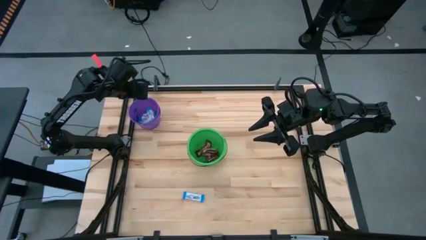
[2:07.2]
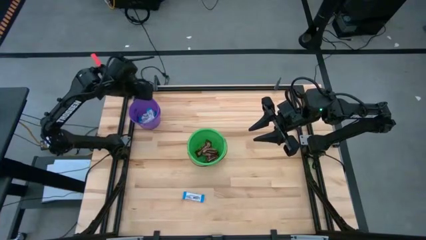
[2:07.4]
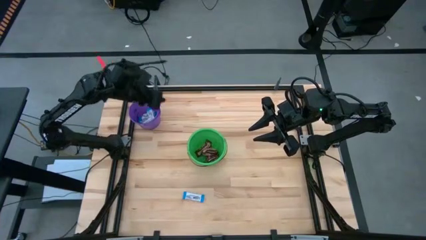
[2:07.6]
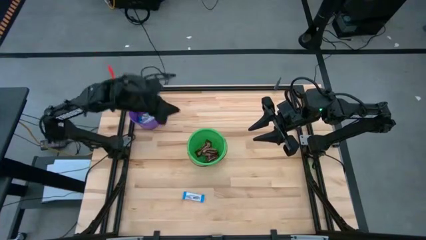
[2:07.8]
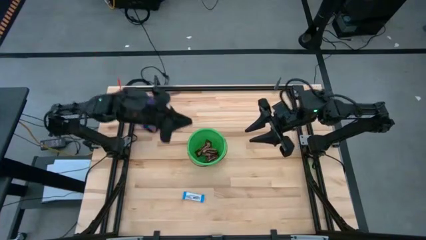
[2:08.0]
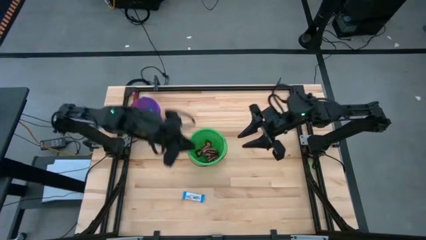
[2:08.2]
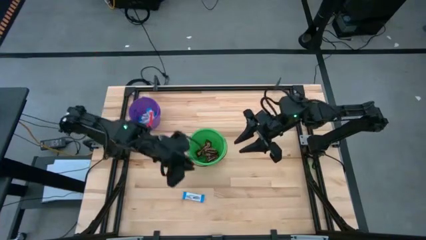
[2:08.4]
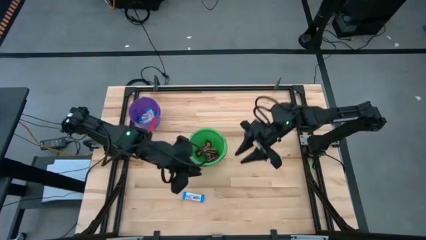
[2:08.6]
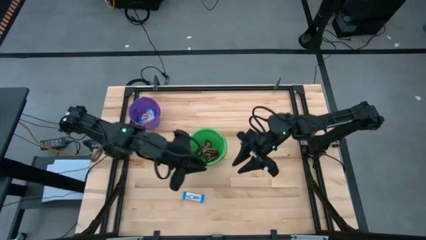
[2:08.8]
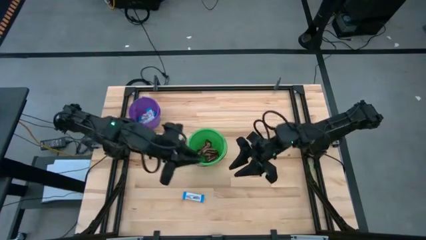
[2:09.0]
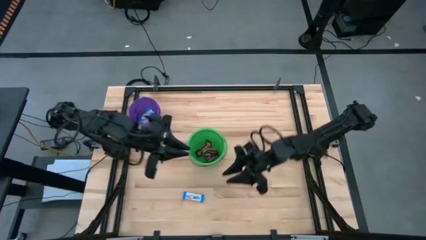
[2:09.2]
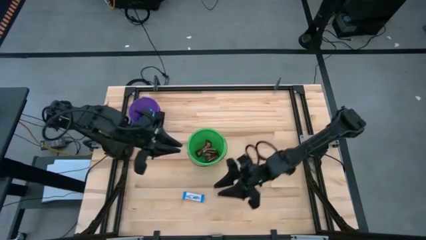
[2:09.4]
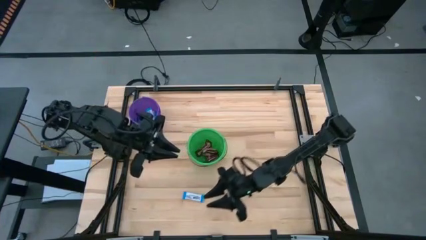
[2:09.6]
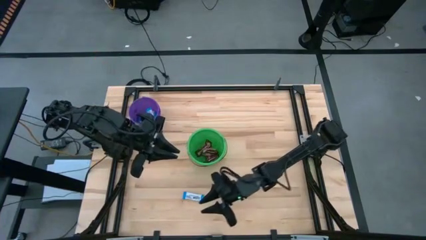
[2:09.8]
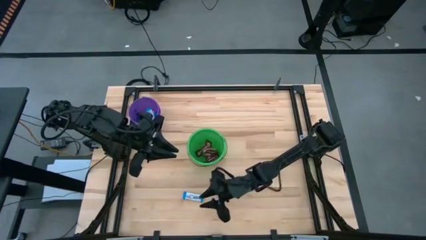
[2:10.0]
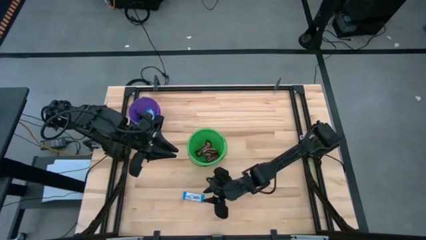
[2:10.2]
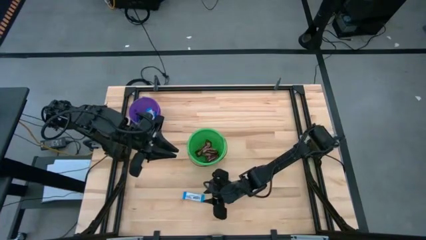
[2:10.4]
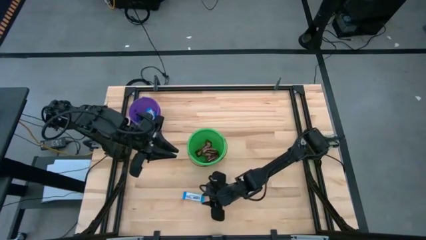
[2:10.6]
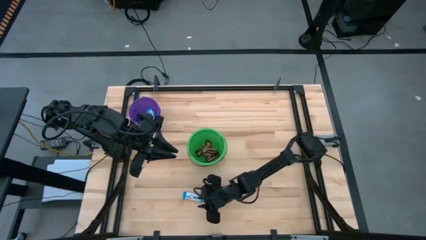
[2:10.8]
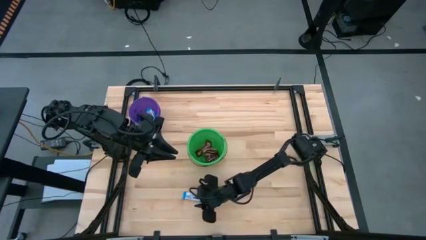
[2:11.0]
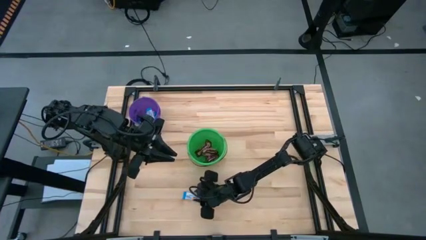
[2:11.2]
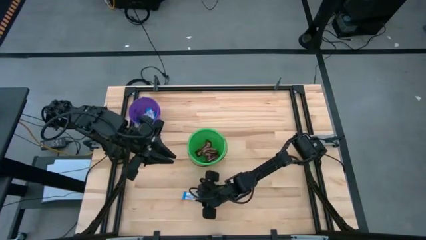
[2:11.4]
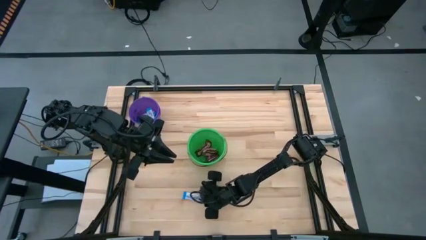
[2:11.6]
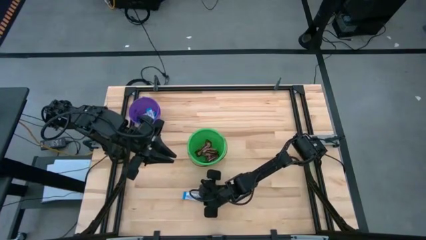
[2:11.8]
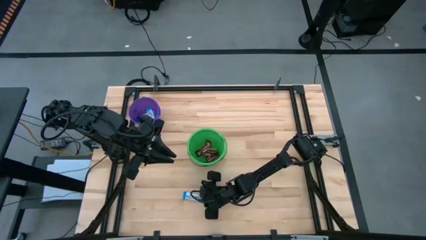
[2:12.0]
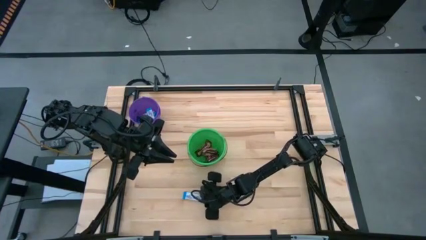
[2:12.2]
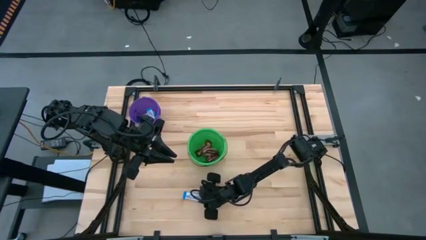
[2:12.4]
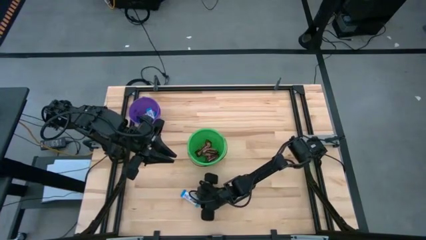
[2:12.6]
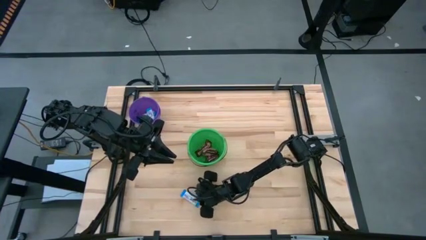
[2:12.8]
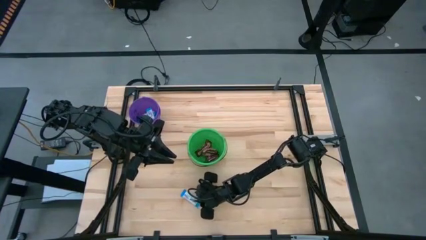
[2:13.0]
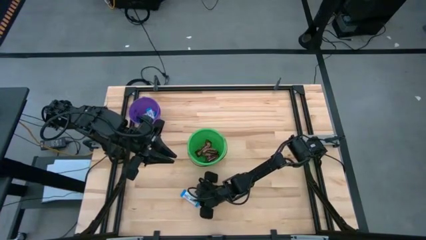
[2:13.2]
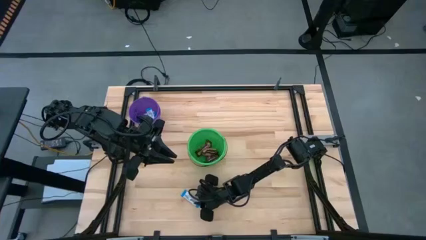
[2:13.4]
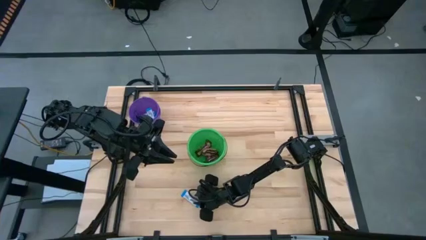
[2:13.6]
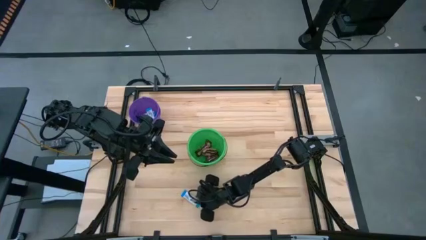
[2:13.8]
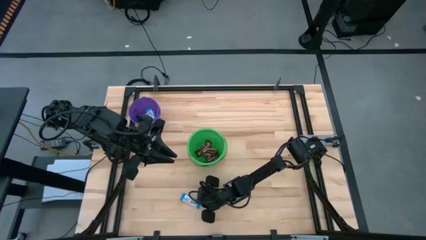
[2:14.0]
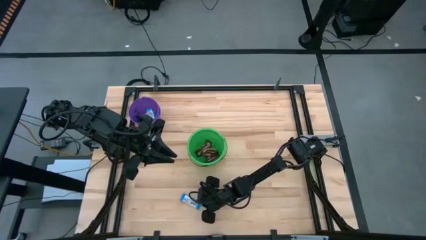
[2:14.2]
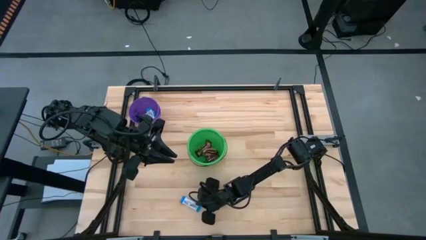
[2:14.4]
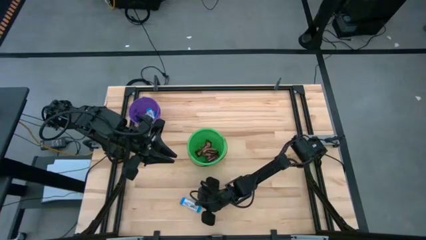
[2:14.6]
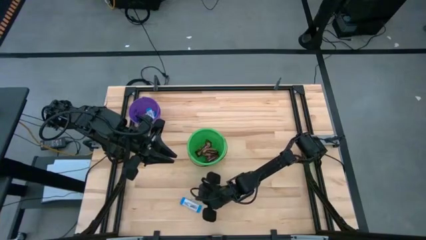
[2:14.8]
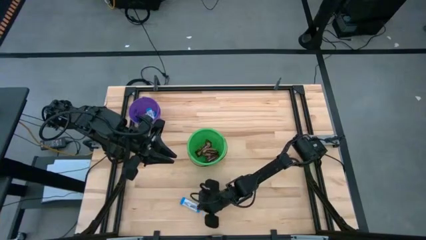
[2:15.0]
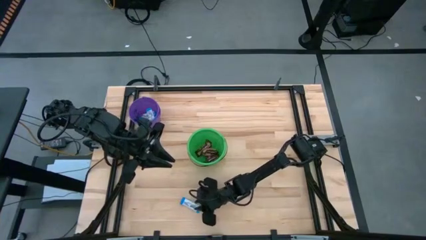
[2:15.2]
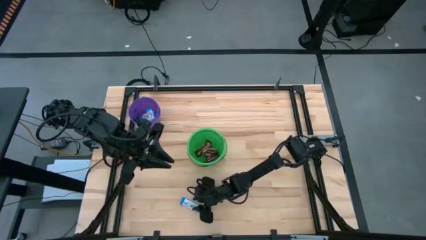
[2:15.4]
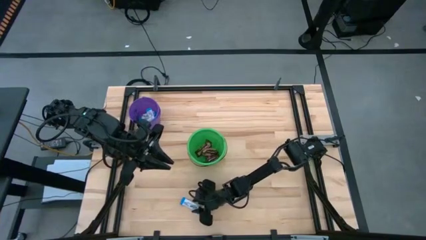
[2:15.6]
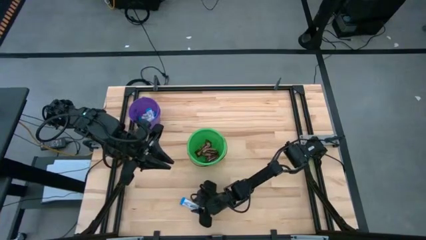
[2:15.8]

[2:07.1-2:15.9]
Task: Sort candy by brand, put in halloween buckets
Put the white chocolate bar into the violet bucket

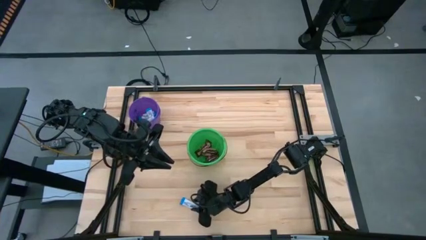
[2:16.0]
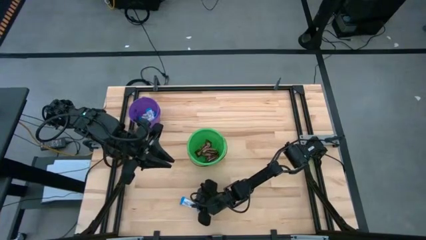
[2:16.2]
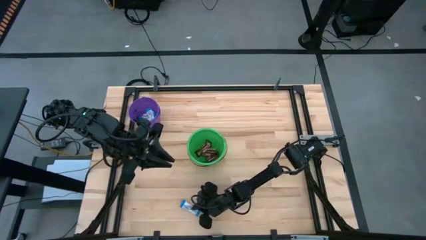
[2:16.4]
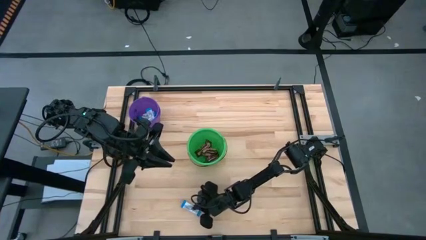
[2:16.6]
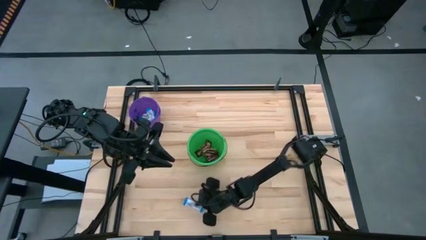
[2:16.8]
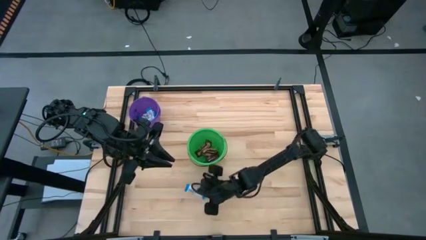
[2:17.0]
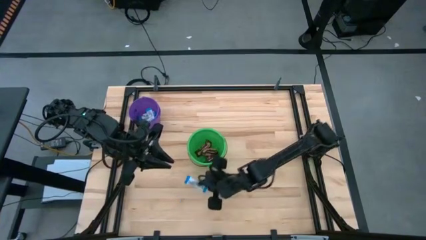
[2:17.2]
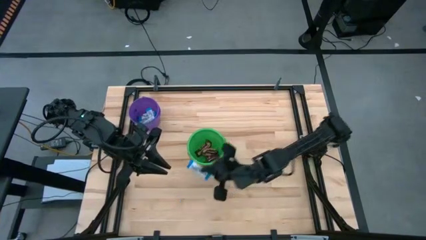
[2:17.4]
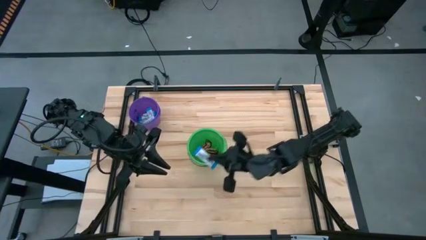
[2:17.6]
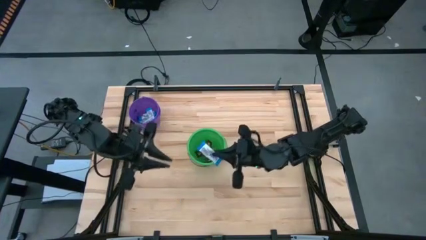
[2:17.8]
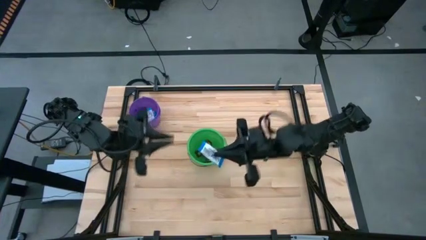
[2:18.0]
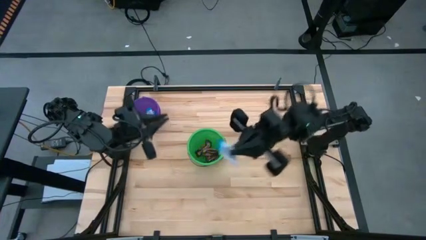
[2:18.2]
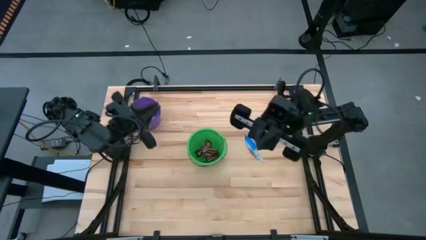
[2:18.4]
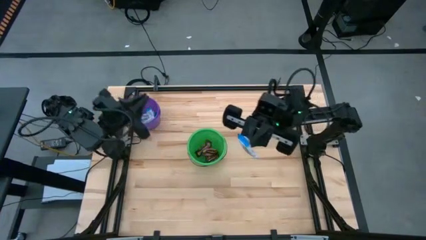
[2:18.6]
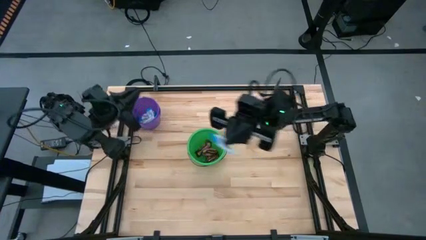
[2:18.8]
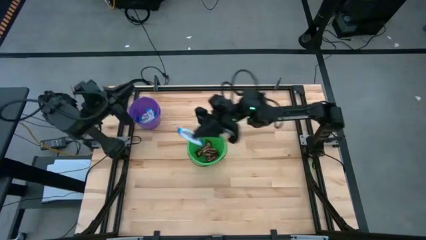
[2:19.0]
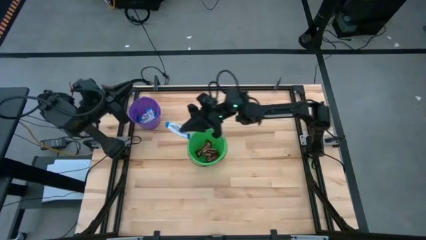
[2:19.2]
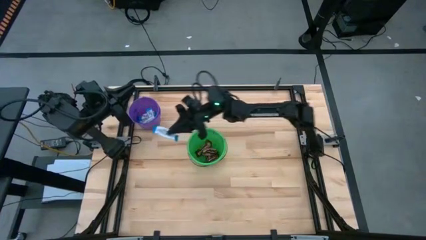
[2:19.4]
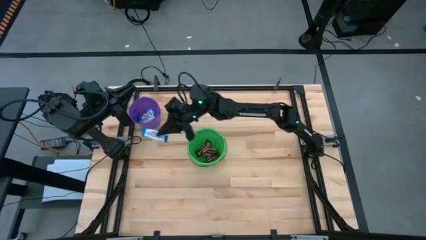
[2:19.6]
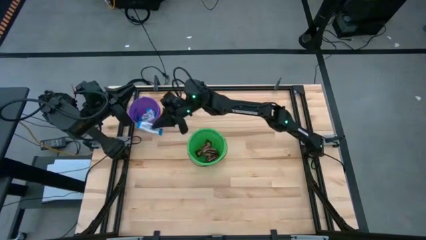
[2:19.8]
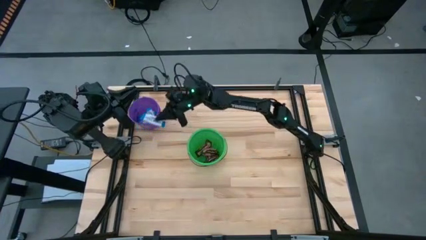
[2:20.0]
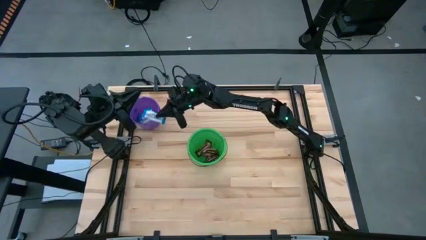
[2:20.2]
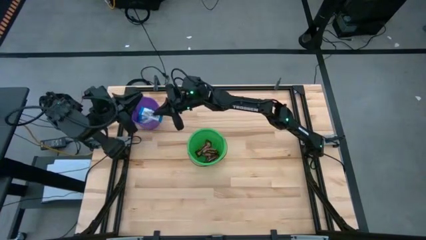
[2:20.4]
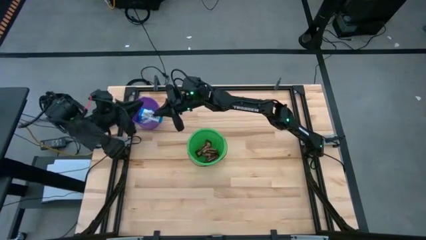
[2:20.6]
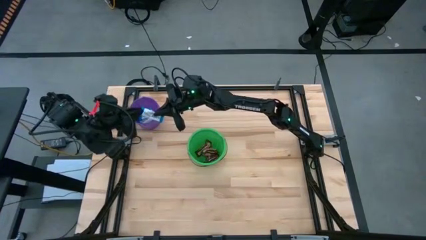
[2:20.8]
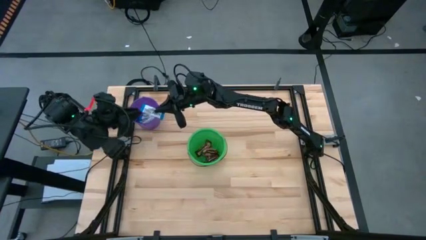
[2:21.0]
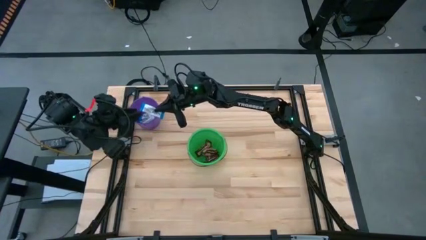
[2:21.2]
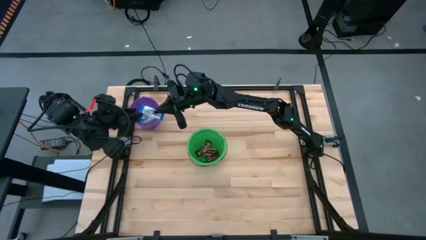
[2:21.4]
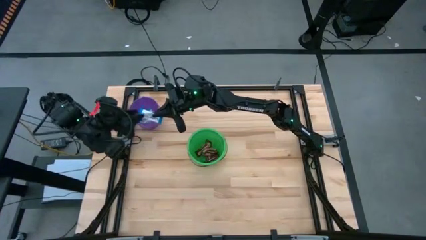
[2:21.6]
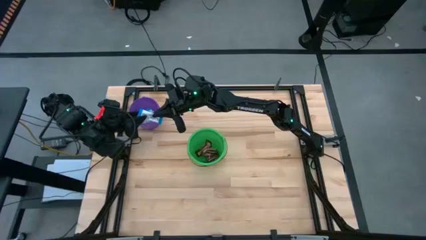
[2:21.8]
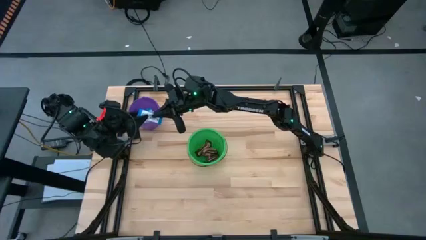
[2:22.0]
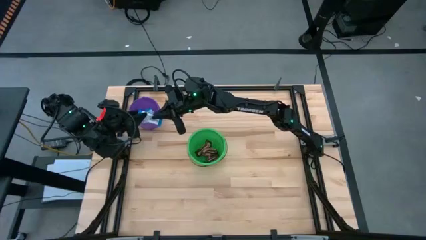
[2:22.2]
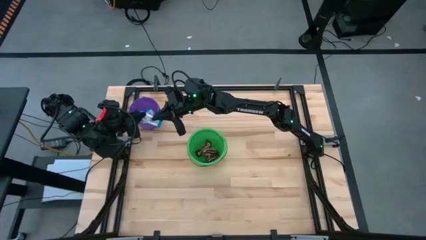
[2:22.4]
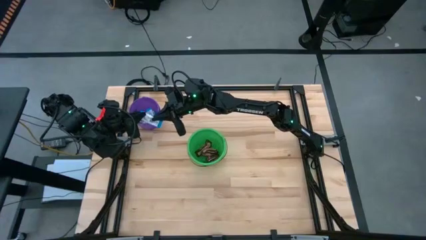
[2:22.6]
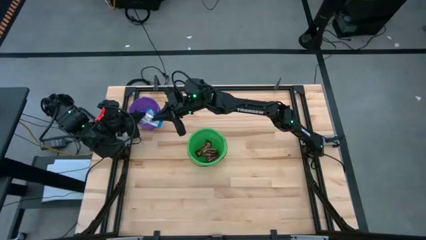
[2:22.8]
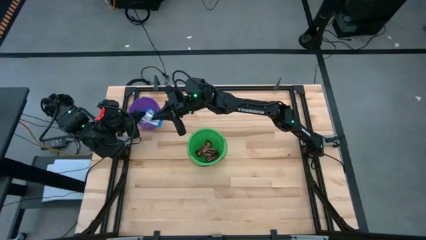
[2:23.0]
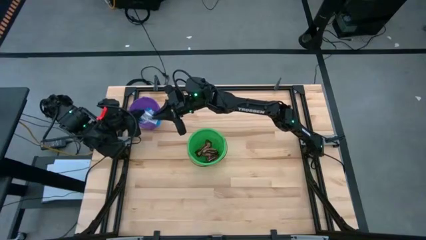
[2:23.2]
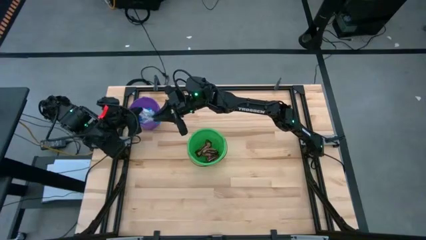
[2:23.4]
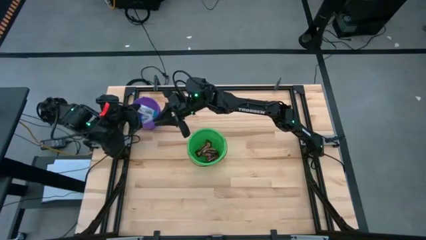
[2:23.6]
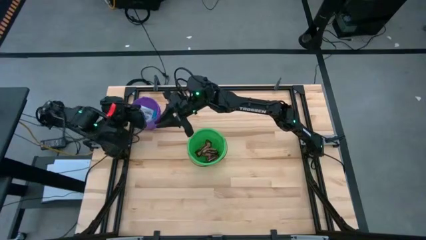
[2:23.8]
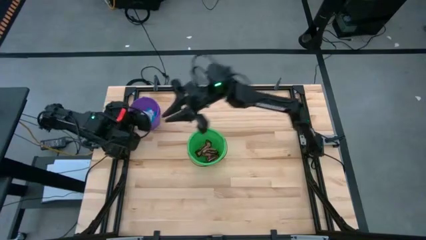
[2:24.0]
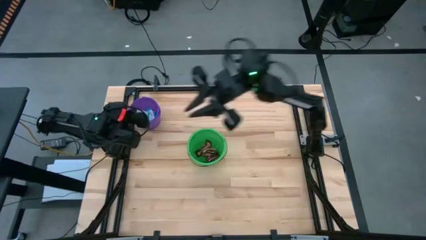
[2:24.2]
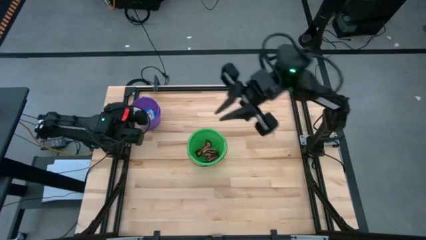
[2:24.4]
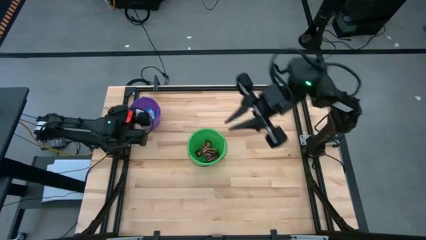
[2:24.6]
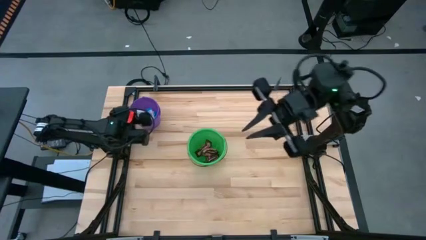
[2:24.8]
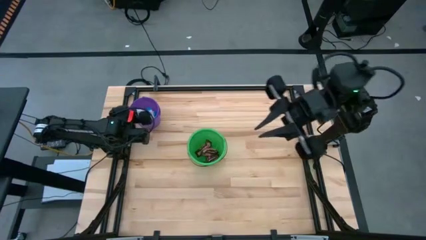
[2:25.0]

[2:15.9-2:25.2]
Put the white chocolate bar into the violet bucket
